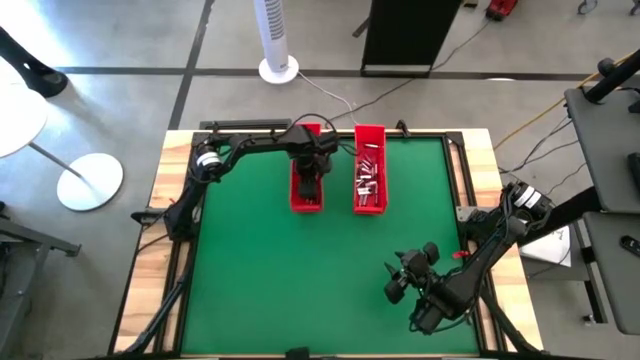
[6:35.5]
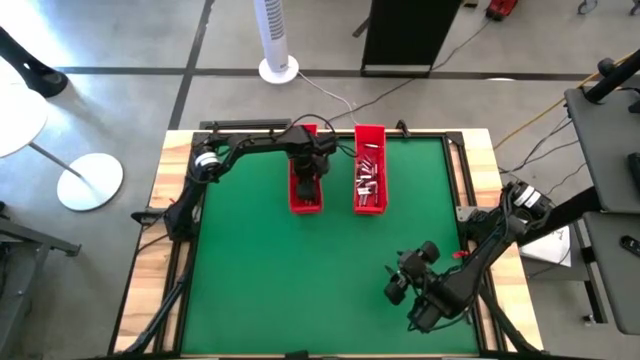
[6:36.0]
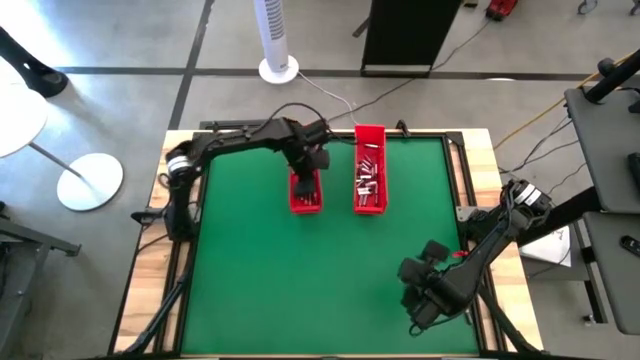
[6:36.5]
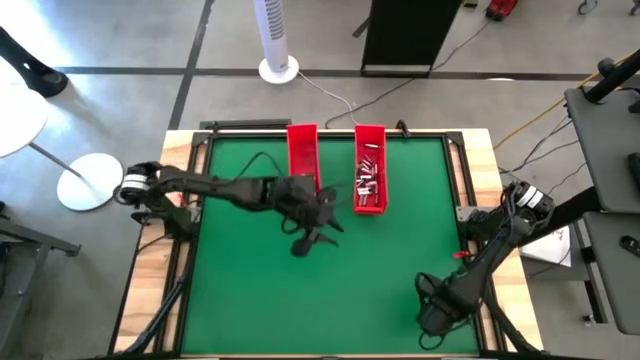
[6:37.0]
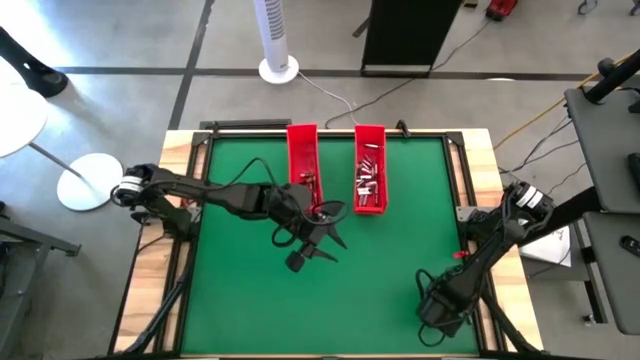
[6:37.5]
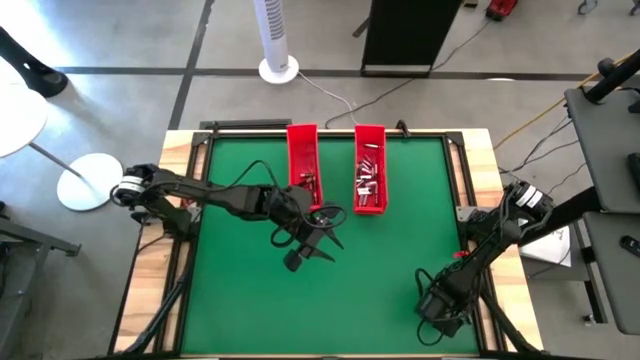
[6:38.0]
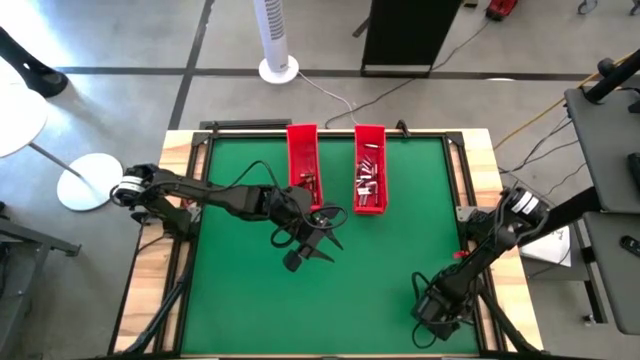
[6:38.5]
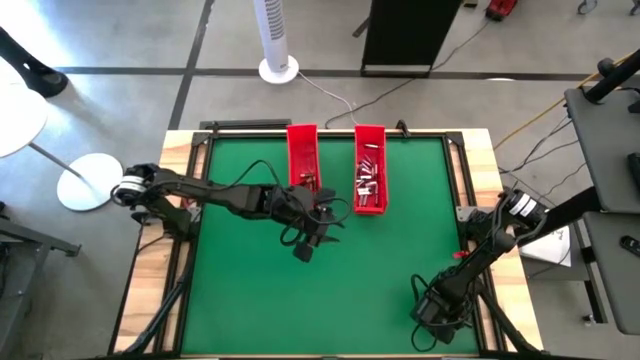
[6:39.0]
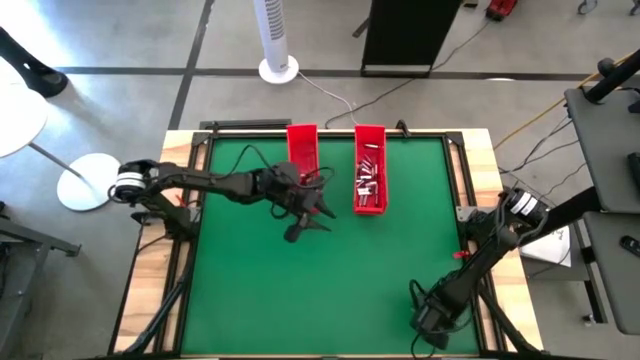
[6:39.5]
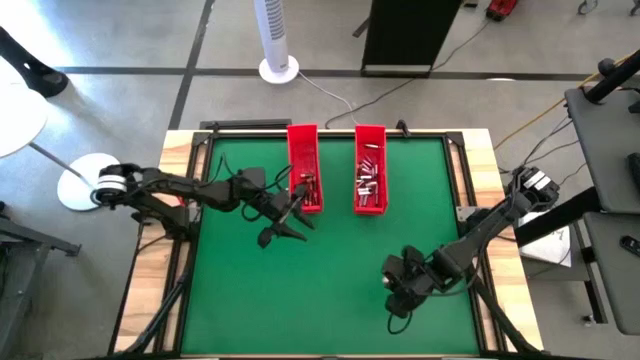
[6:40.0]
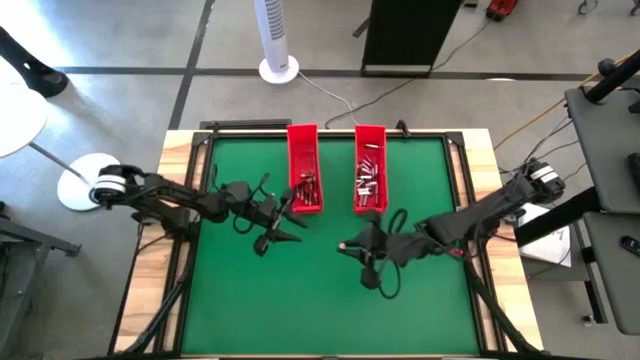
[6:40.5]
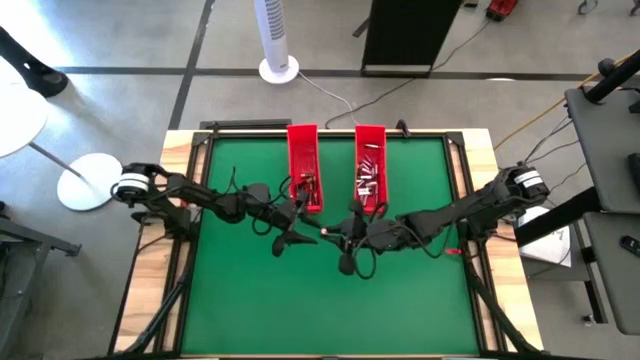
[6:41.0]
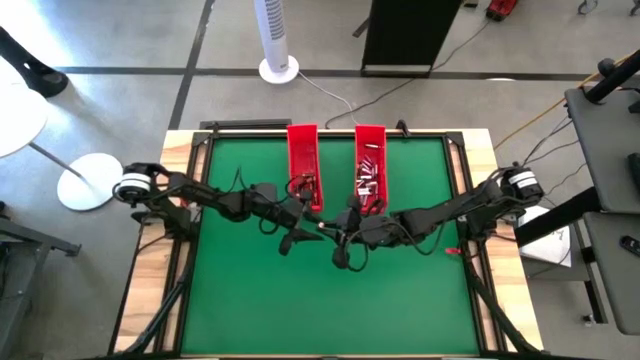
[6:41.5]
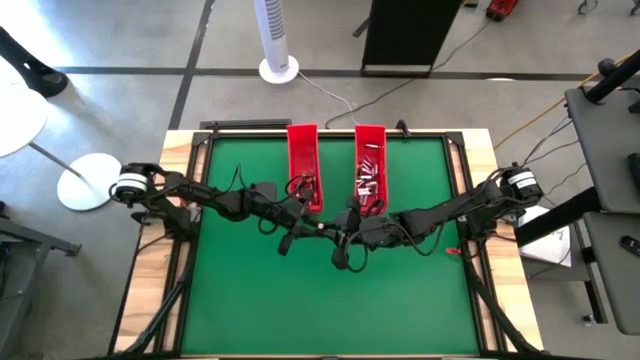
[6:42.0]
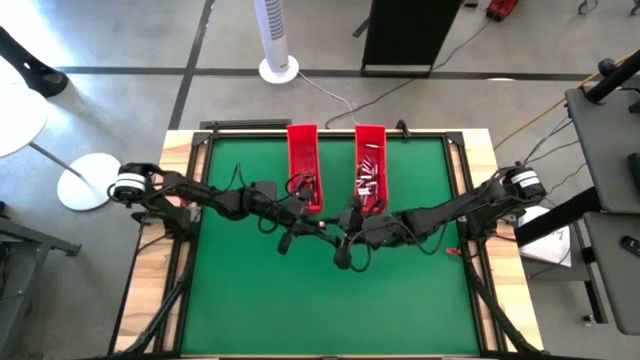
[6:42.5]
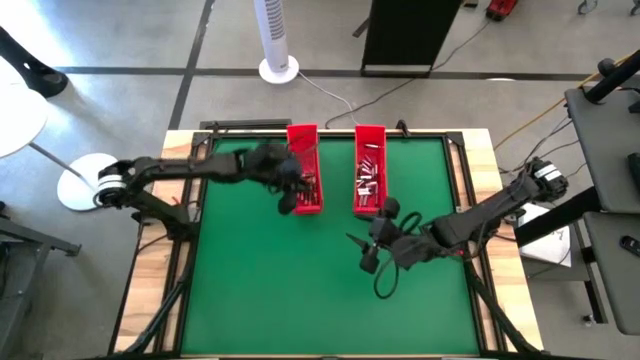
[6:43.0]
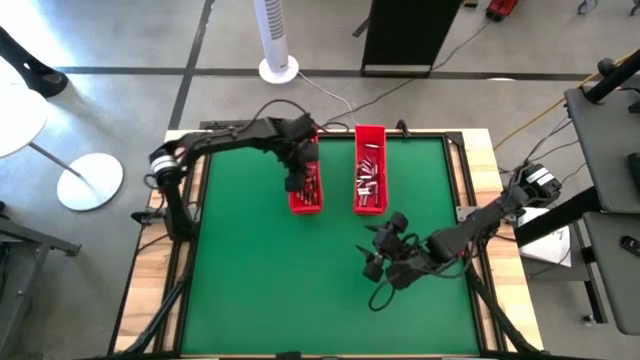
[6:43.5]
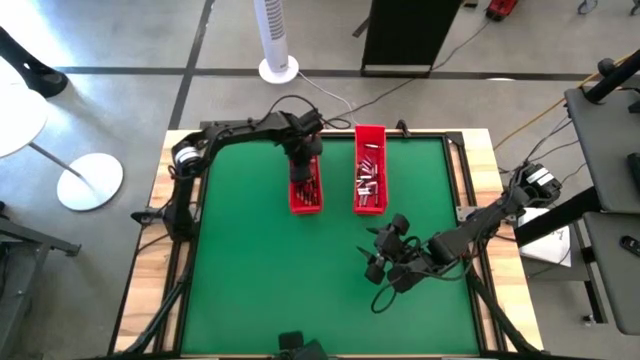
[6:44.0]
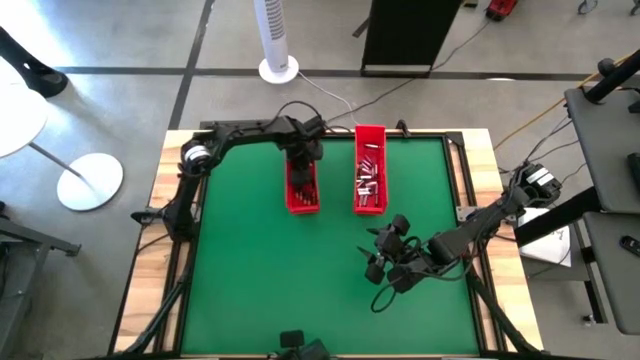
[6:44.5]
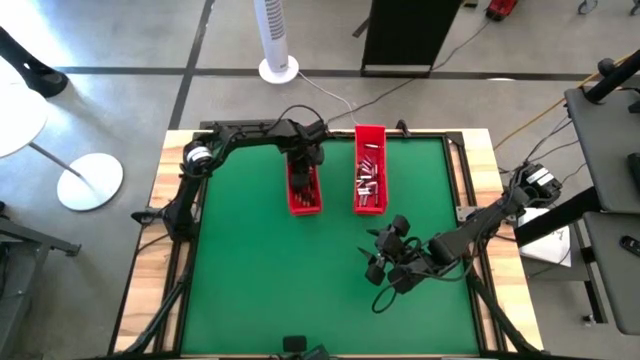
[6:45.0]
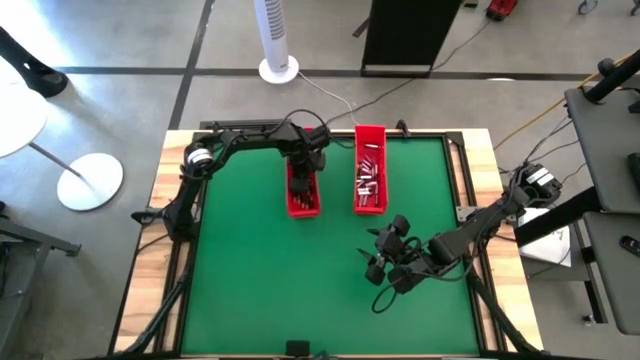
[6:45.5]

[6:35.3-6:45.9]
Task: Sort batteries
Put the black battery into the left red bin

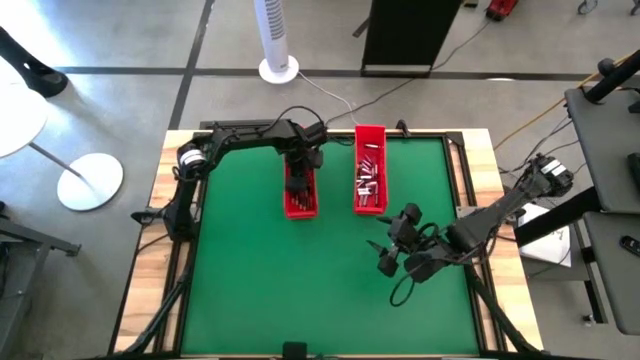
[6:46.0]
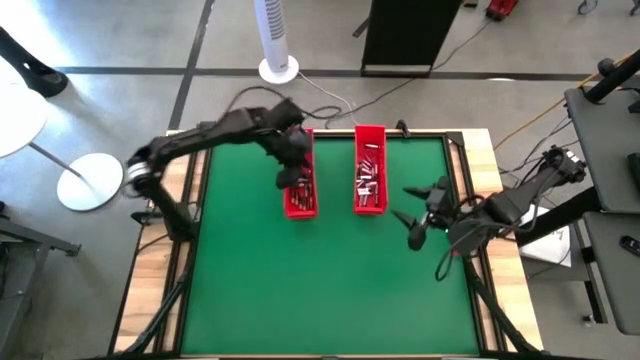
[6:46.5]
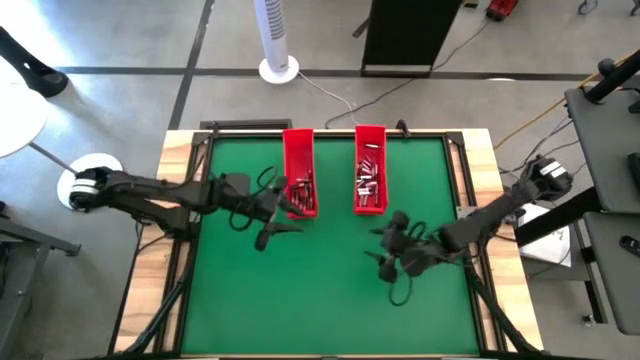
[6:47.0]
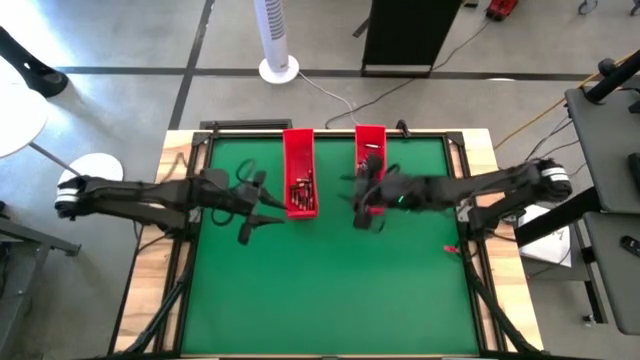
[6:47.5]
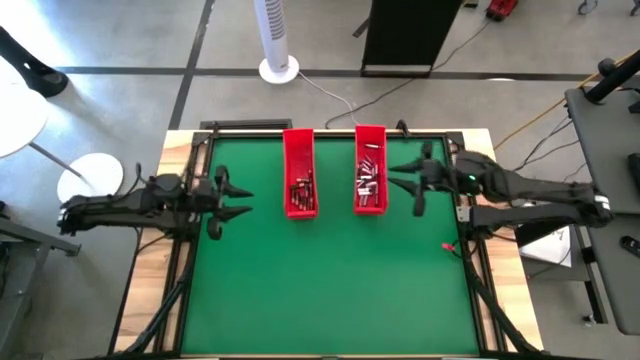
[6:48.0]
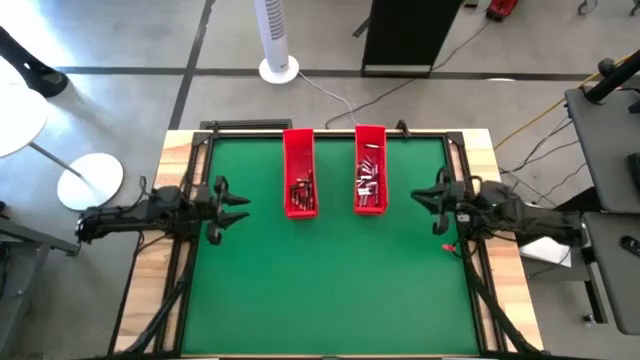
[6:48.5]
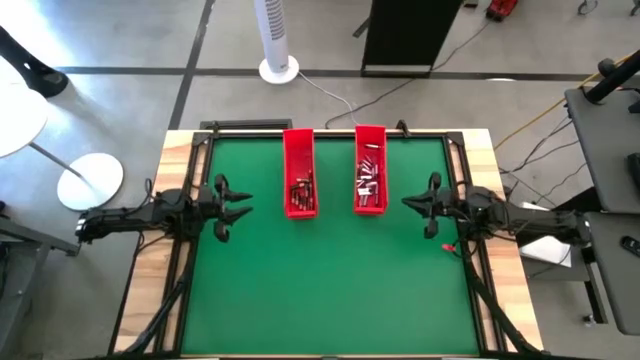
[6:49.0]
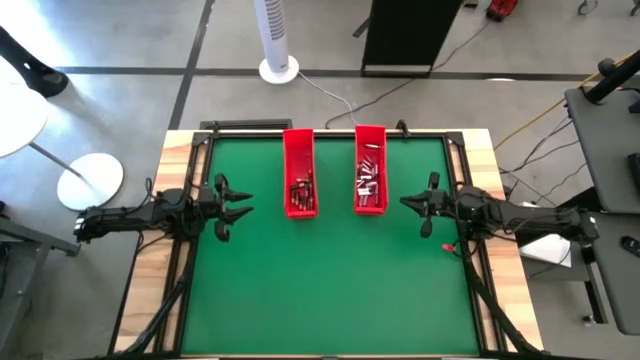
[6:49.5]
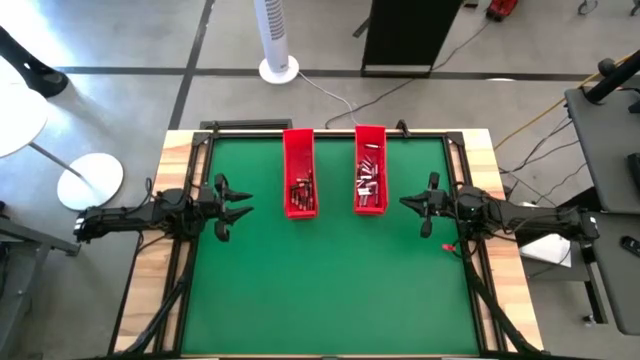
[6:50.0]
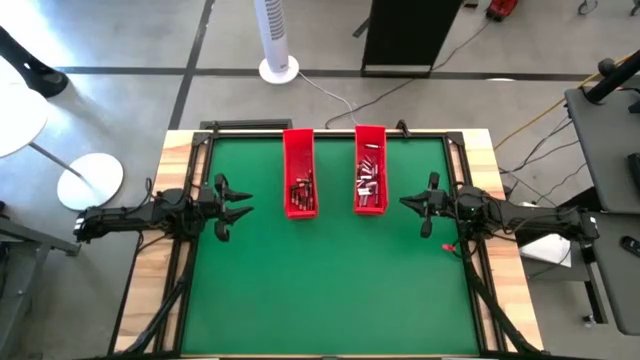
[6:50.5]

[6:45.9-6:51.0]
Return to home position

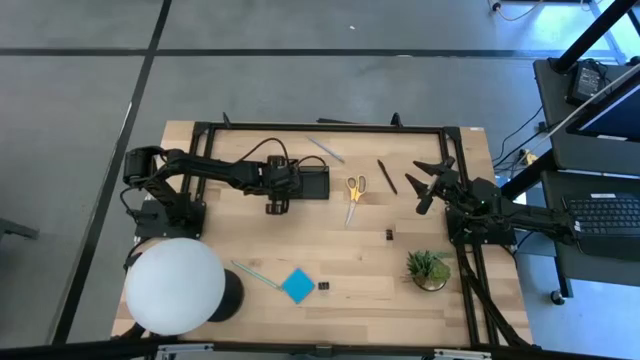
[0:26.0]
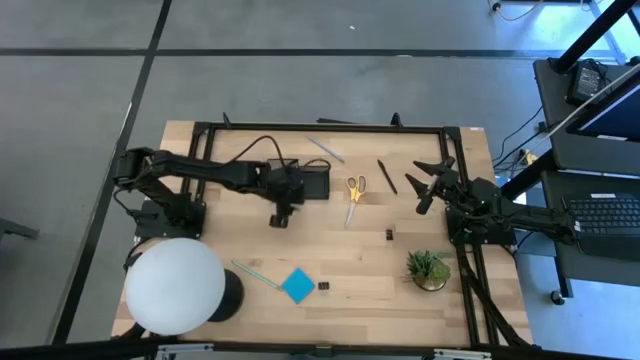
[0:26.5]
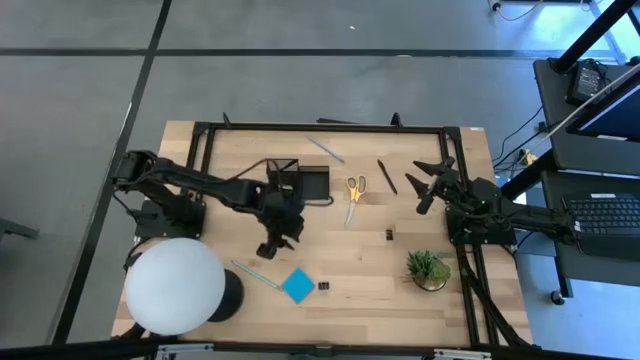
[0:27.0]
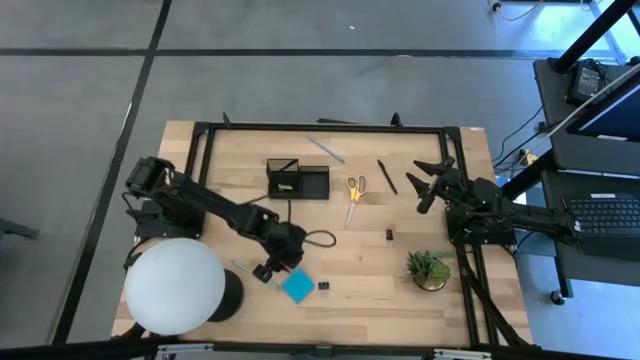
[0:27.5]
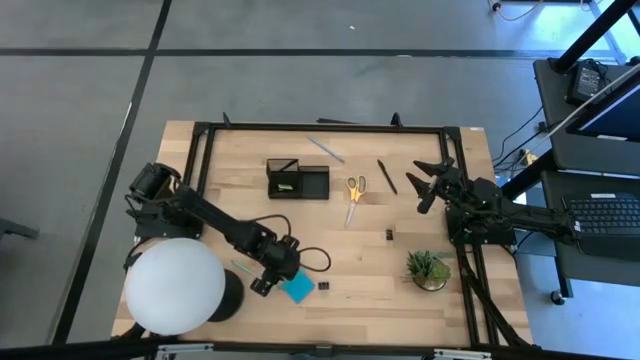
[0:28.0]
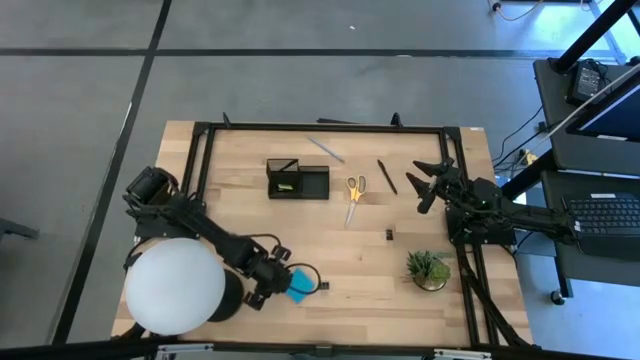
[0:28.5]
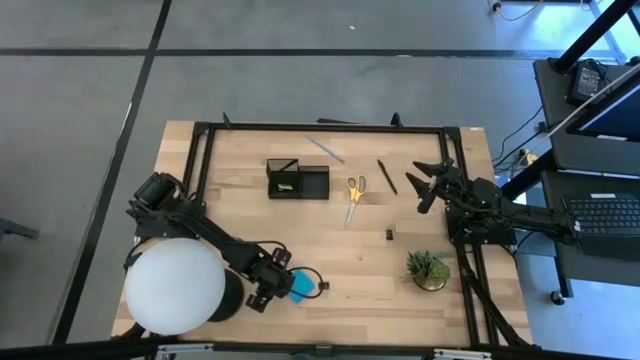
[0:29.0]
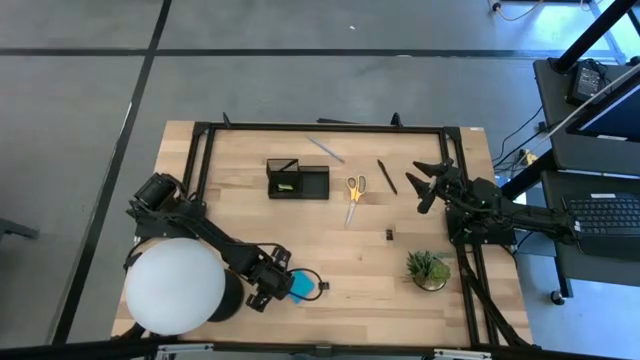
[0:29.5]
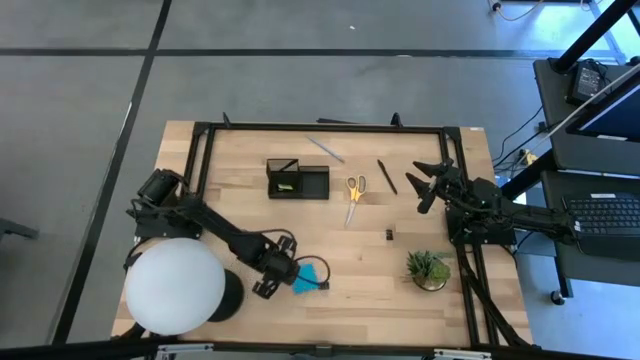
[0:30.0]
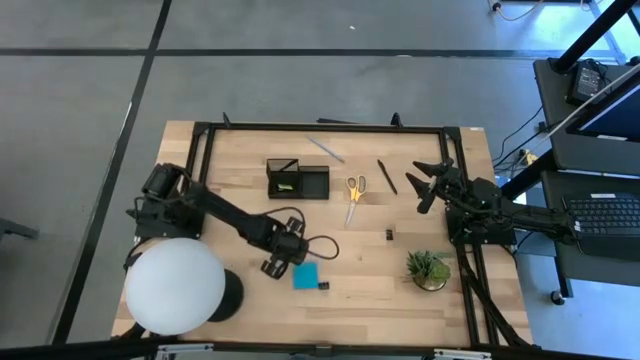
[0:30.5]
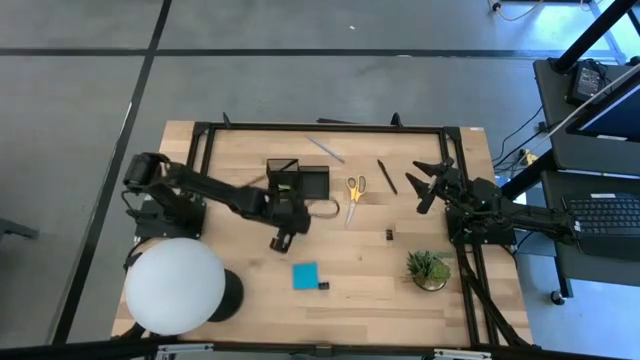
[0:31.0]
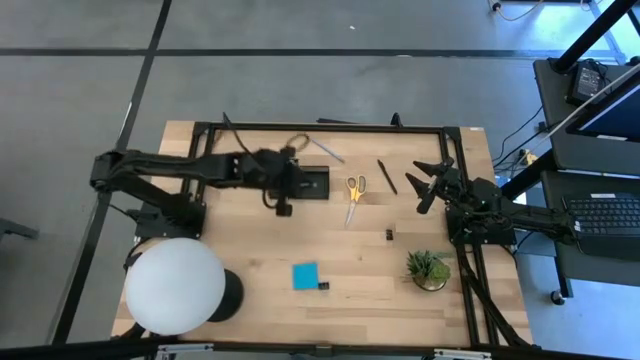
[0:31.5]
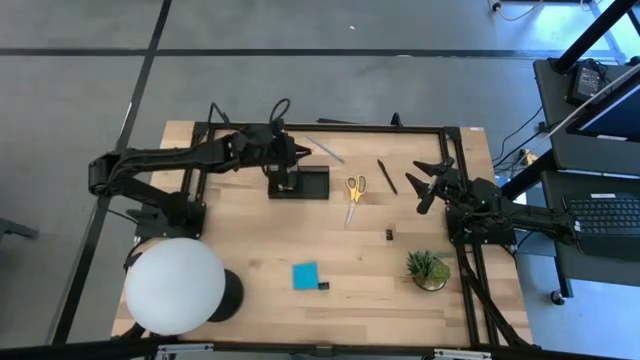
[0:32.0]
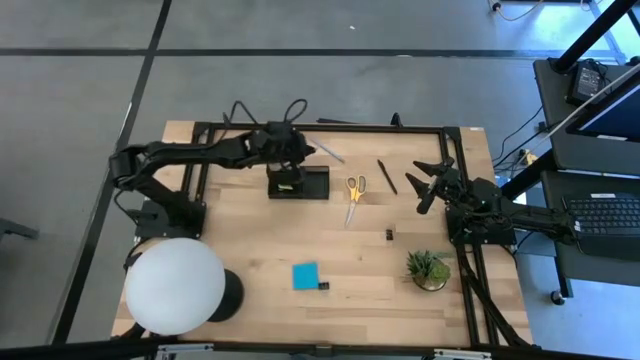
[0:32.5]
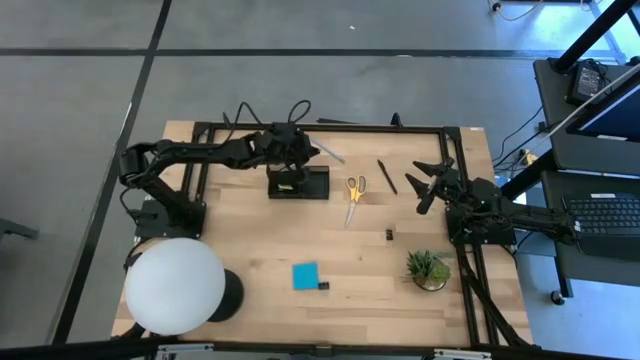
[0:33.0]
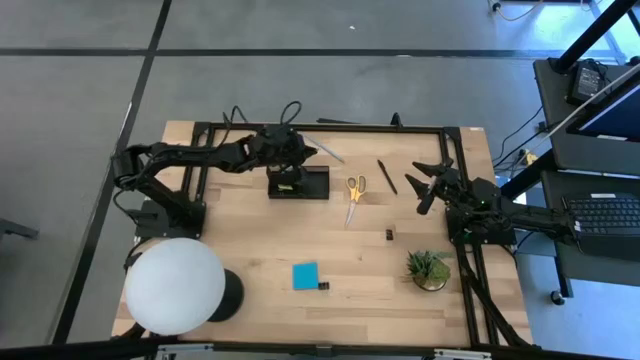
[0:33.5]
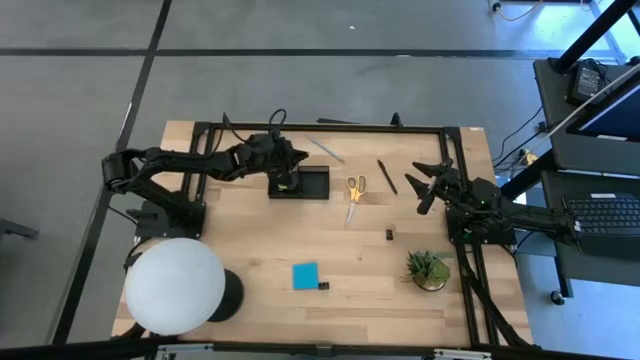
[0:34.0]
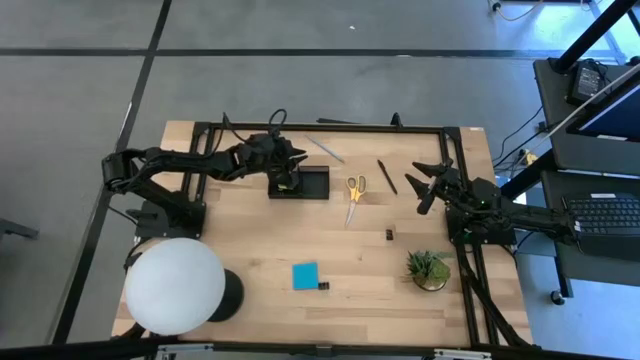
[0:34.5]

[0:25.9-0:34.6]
Task: Pick and place office supplies into organizer
Put the green pencil into the black desk organizer
